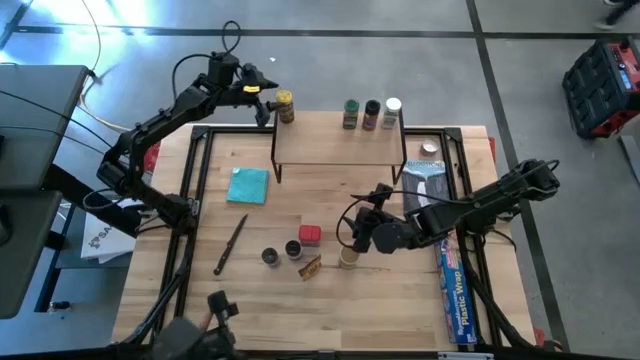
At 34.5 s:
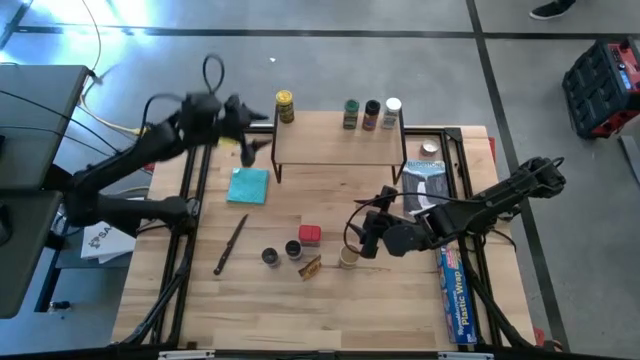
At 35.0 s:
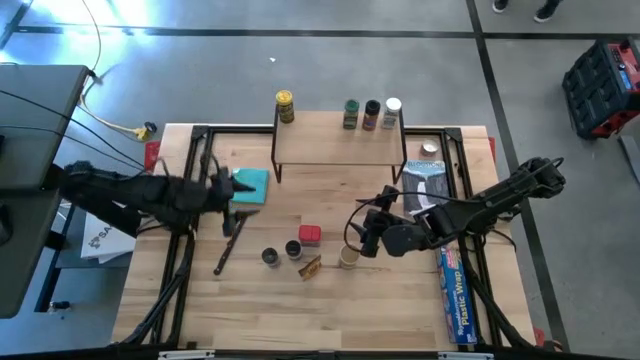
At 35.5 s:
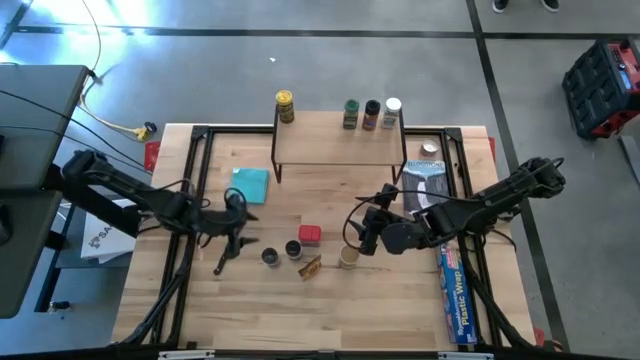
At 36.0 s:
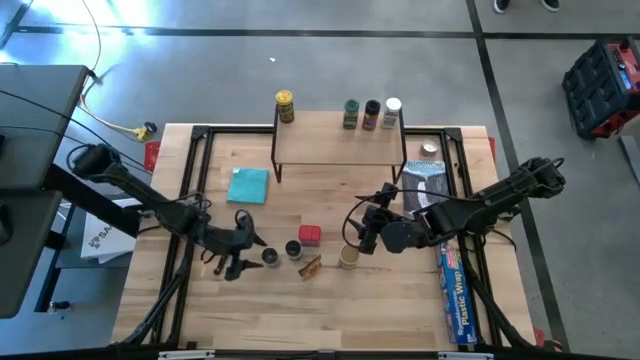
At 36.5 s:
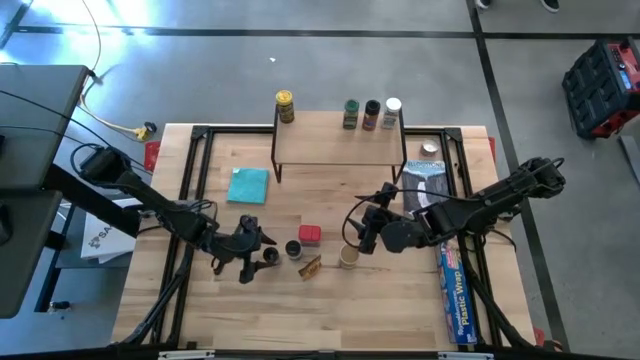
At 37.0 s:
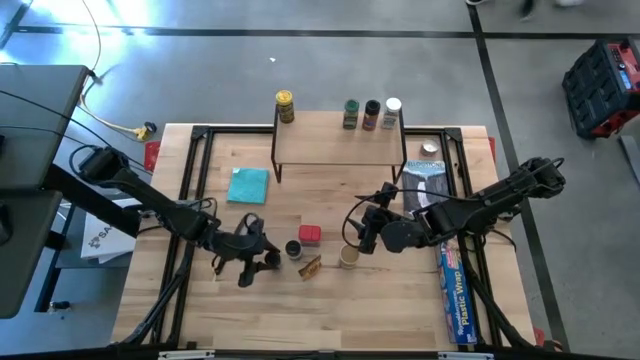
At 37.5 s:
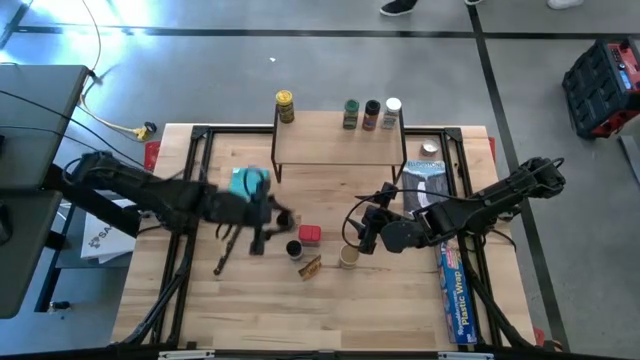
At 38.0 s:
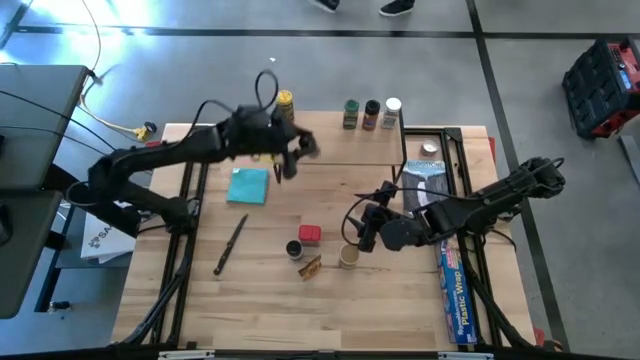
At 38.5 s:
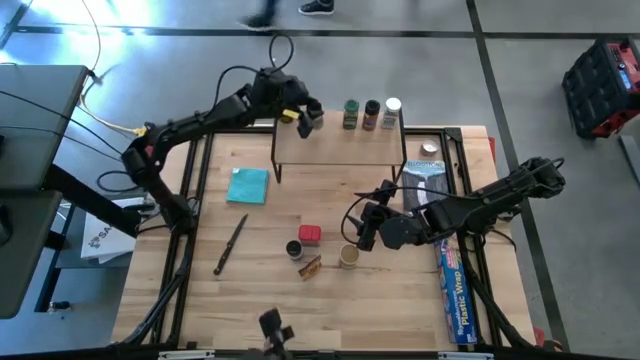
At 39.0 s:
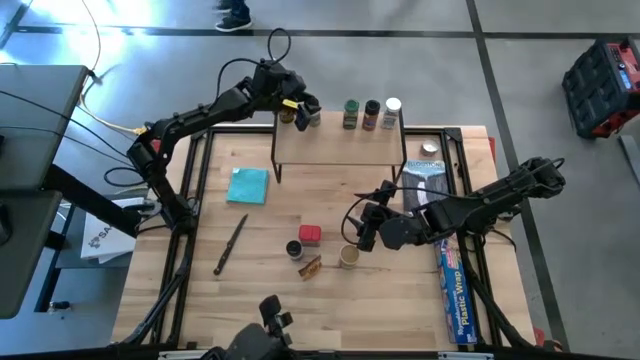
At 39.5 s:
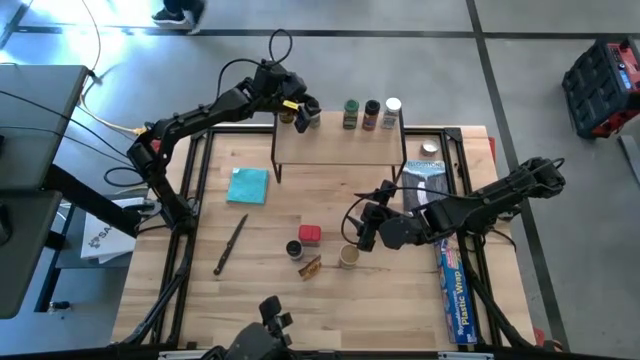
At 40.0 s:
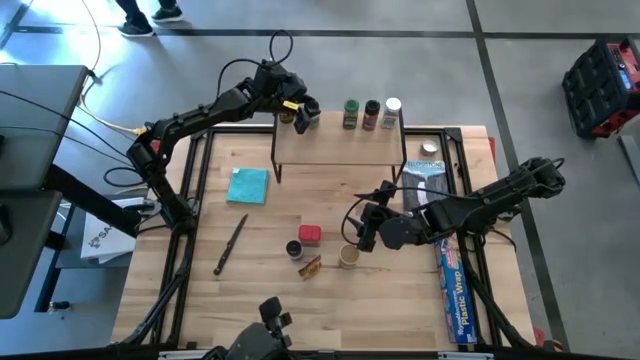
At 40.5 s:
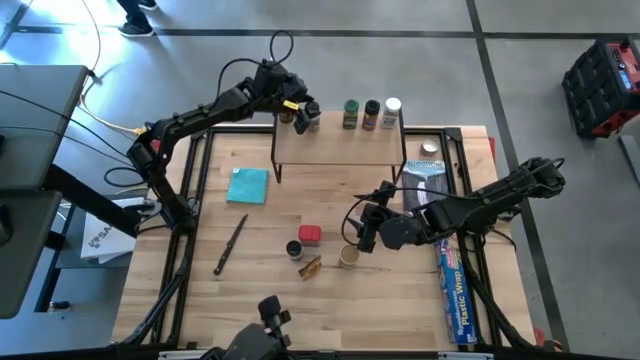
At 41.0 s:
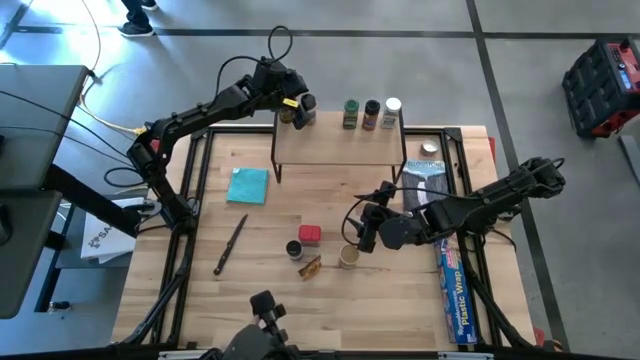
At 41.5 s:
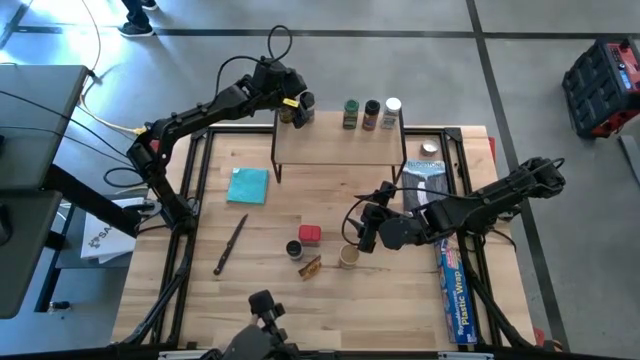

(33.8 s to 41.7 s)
Task: Shelf spices
Put the light green bottle on the shelf

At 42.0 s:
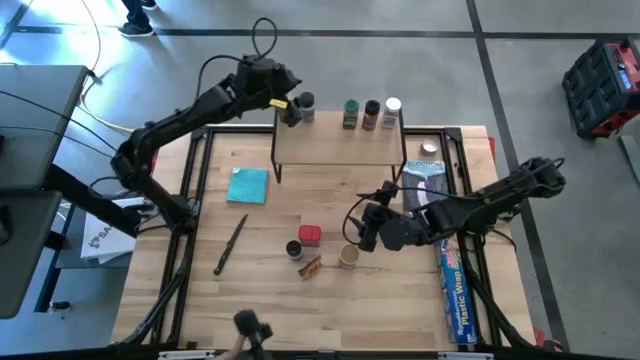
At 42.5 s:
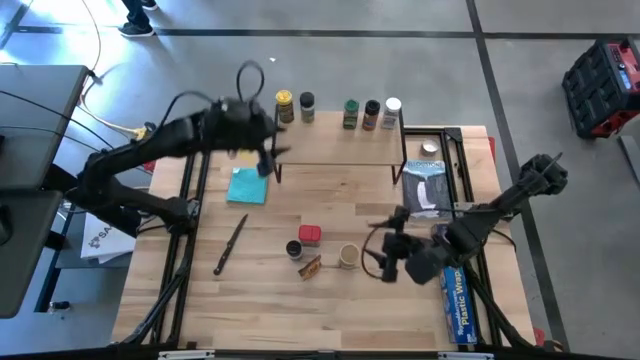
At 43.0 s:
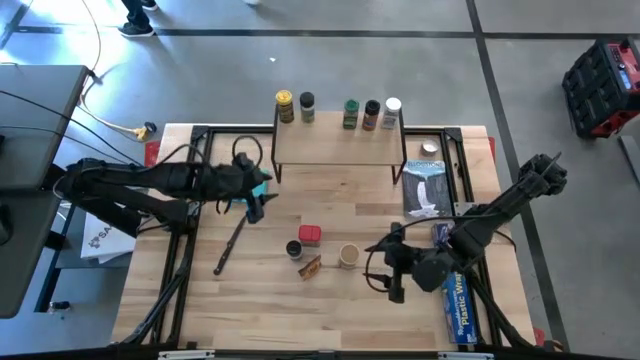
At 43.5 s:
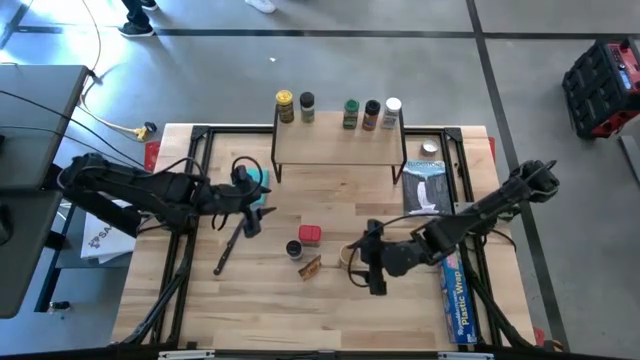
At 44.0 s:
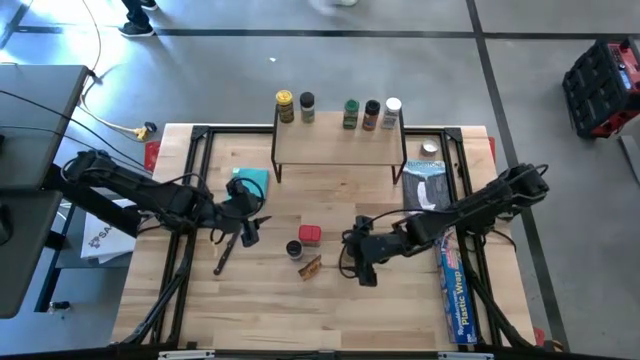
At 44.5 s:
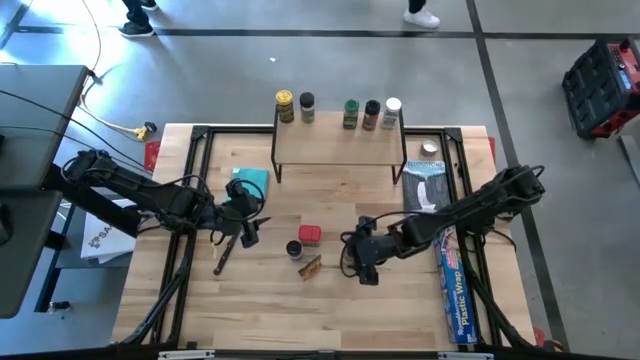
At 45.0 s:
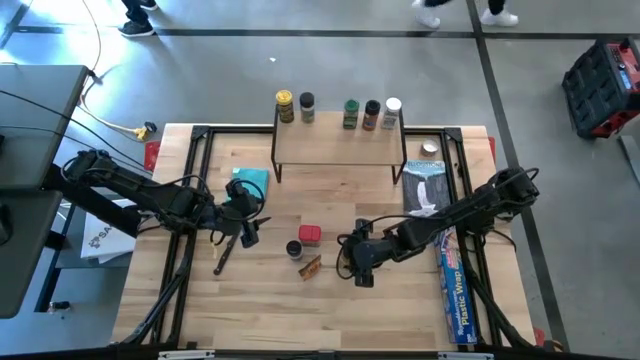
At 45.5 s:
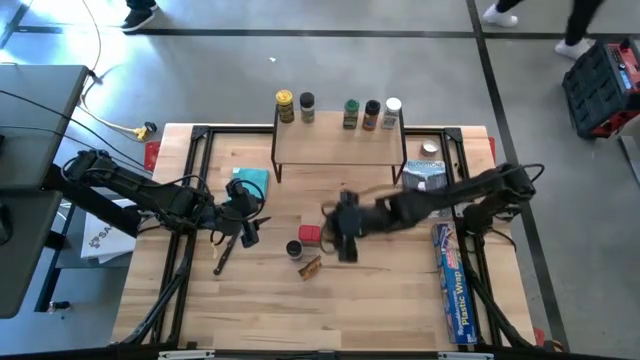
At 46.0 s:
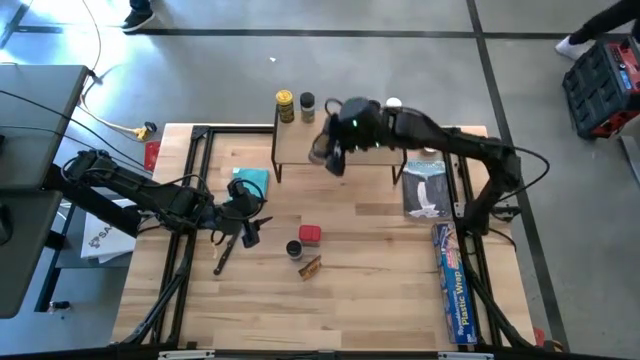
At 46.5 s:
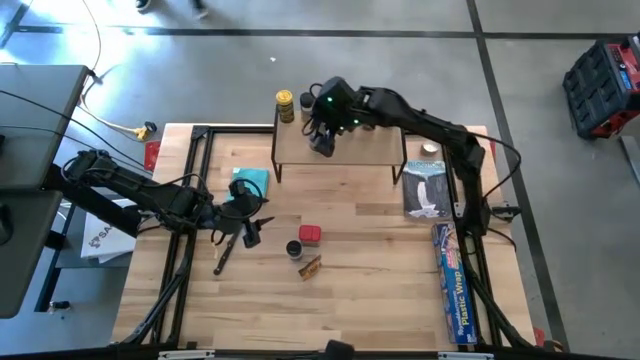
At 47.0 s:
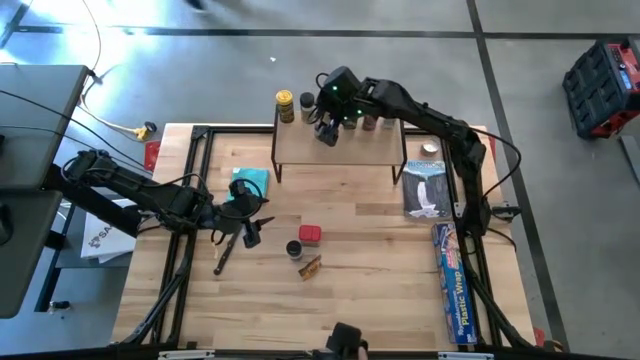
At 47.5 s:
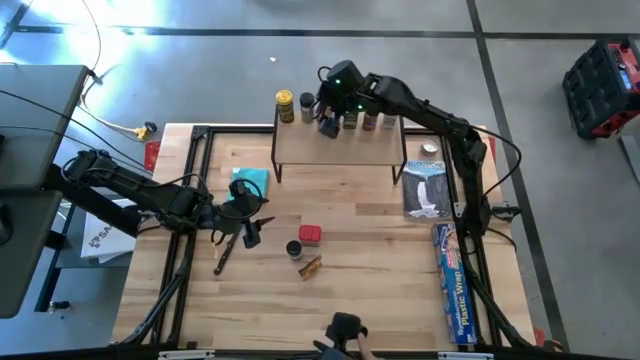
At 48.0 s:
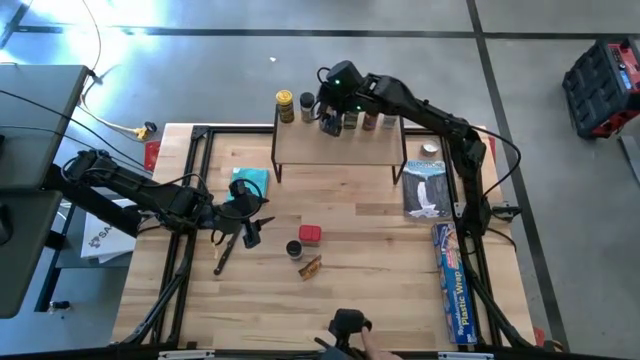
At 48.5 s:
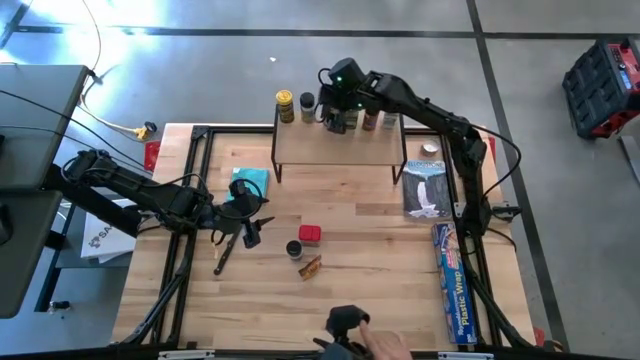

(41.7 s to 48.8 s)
Put the gold spice bottle on the shelf

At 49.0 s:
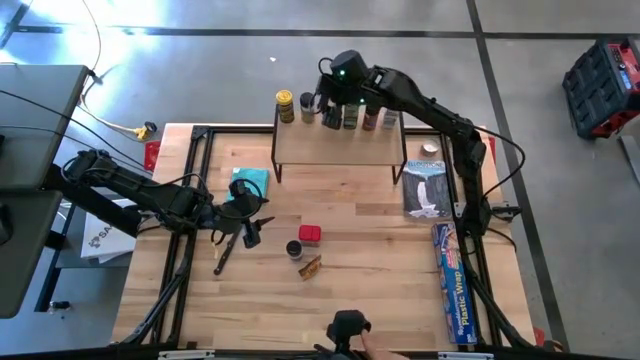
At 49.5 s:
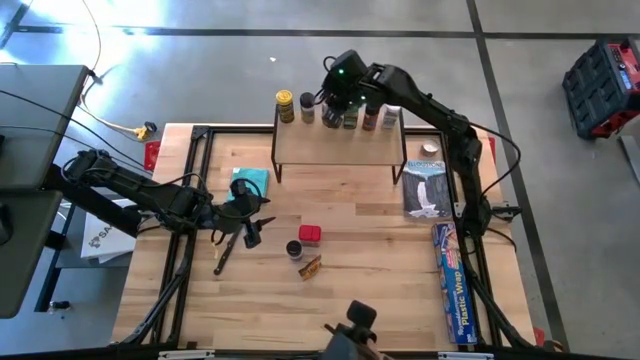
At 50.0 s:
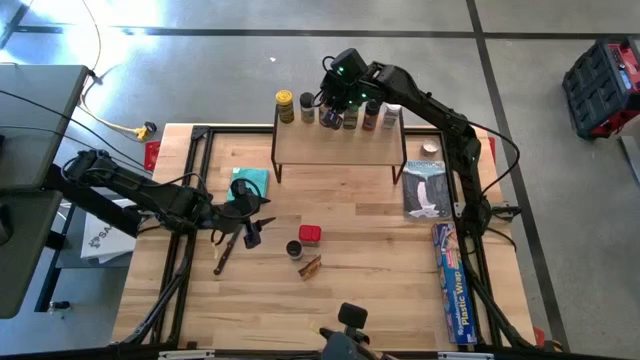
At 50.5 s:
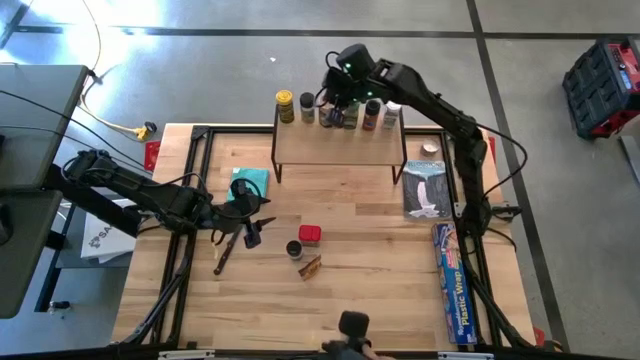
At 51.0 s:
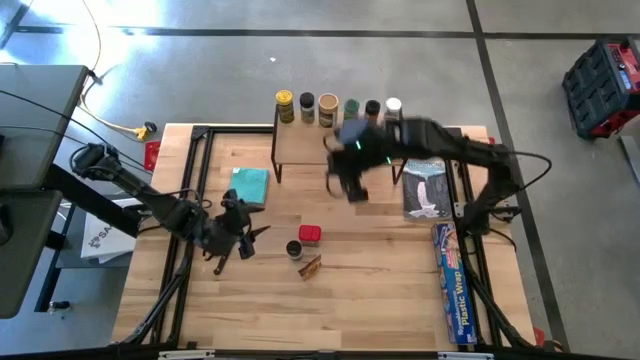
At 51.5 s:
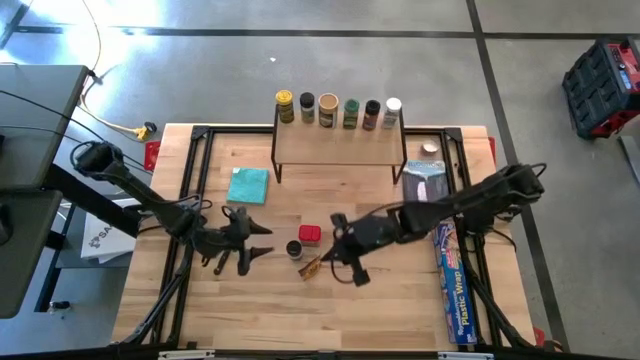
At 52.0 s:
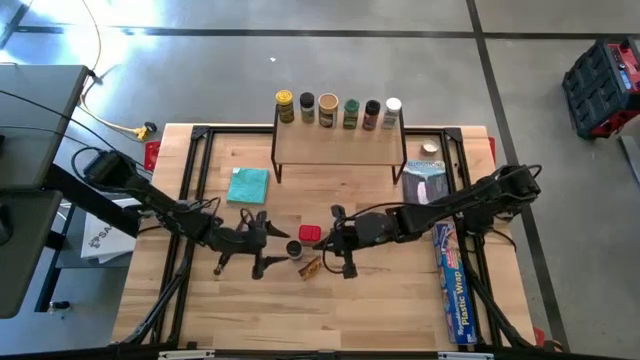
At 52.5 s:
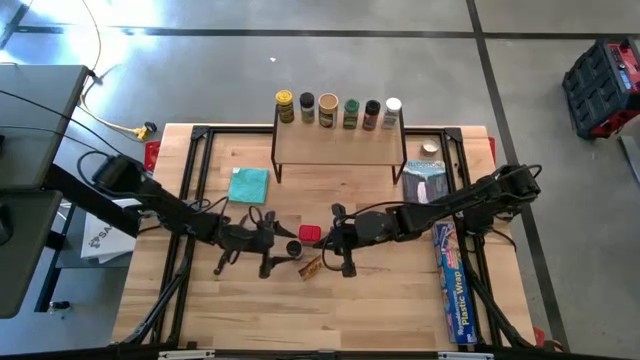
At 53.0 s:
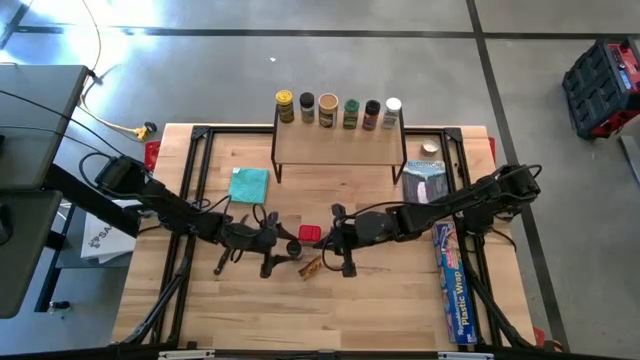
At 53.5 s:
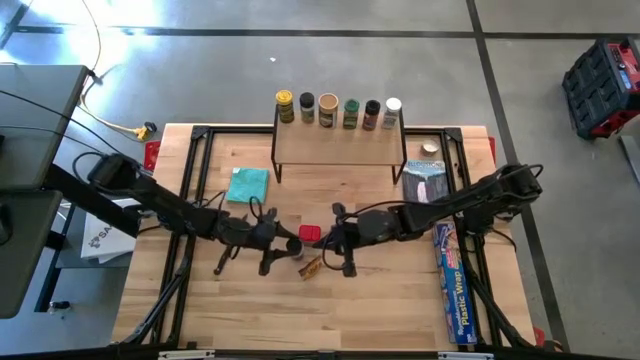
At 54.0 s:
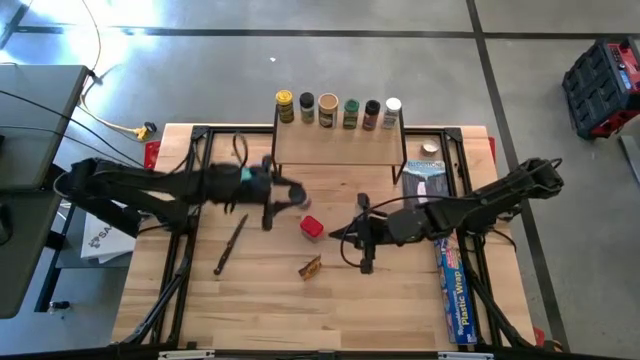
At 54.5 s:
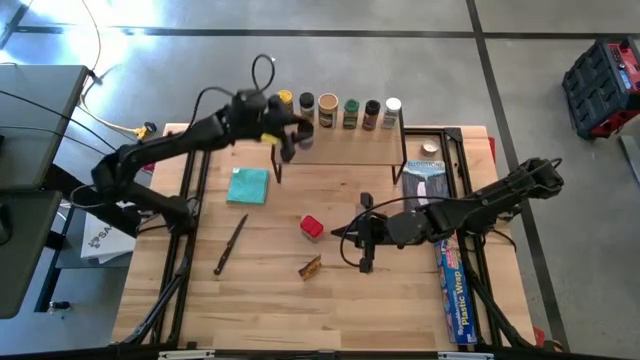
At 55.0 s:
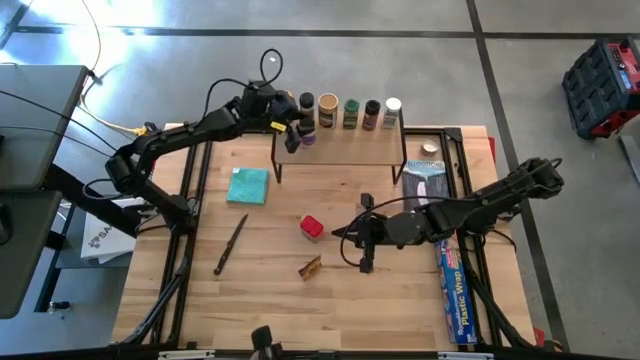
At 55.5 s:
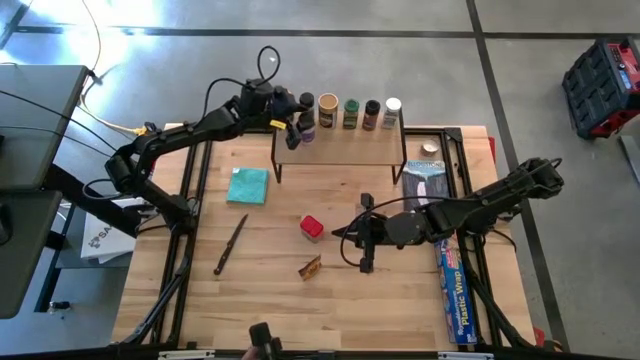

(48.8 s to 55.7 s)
Put the violet spice bottle on the shelf
